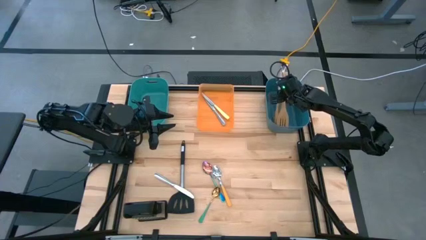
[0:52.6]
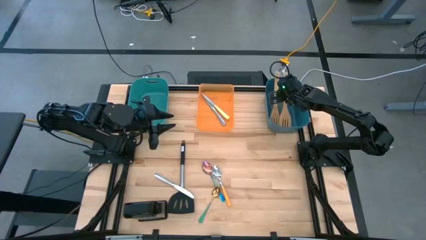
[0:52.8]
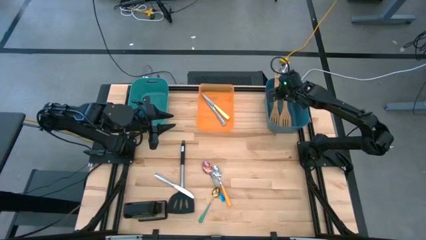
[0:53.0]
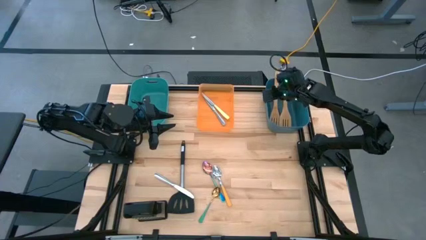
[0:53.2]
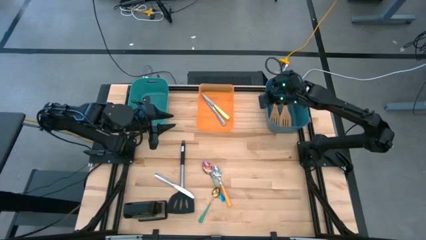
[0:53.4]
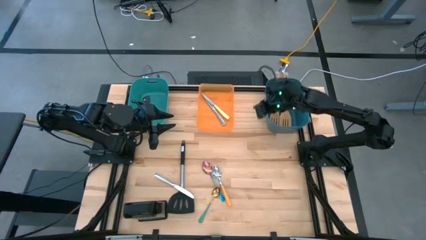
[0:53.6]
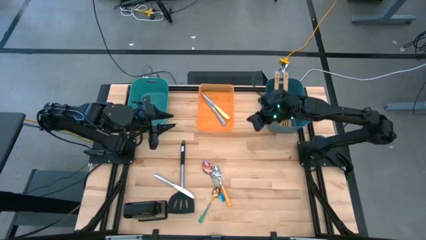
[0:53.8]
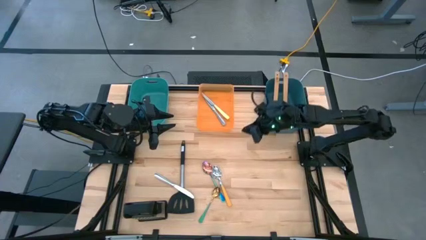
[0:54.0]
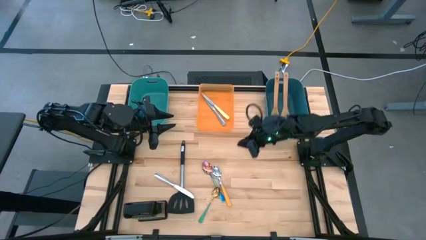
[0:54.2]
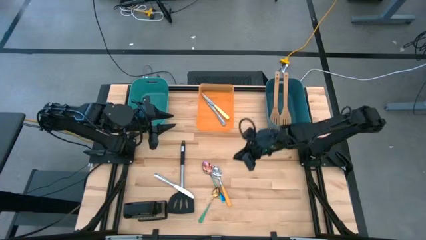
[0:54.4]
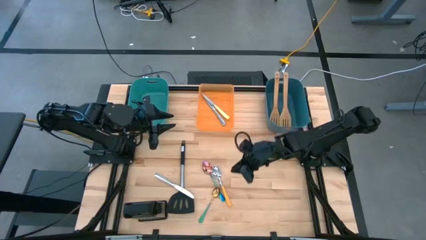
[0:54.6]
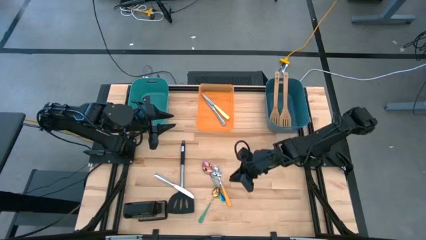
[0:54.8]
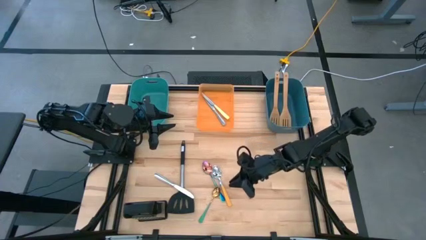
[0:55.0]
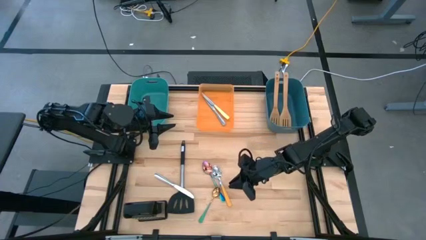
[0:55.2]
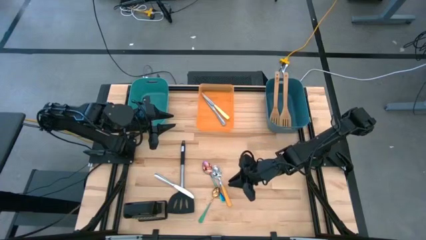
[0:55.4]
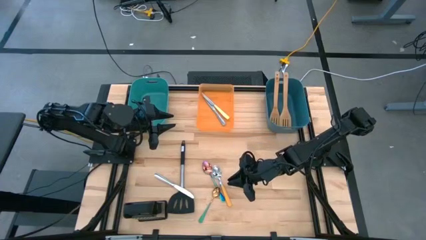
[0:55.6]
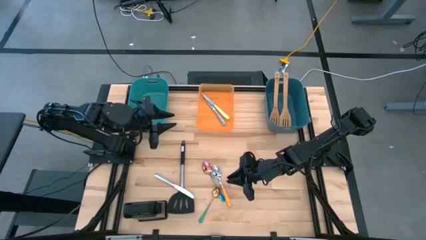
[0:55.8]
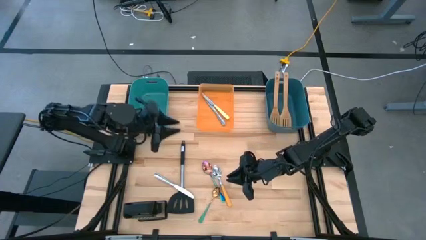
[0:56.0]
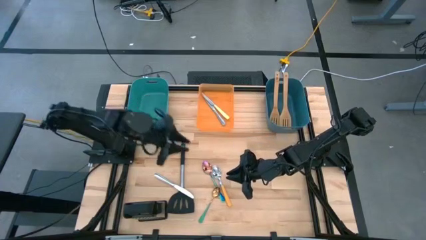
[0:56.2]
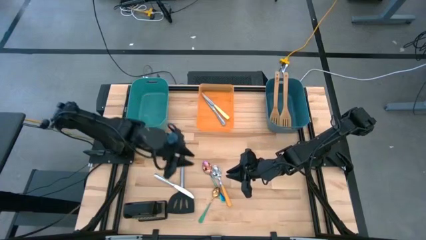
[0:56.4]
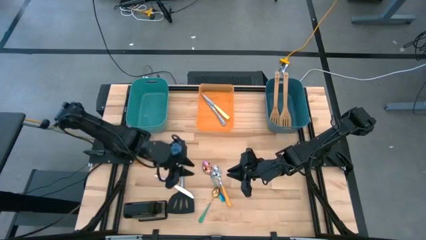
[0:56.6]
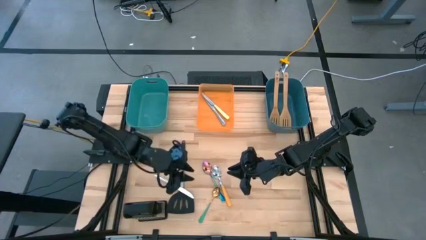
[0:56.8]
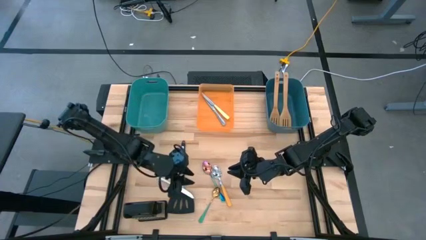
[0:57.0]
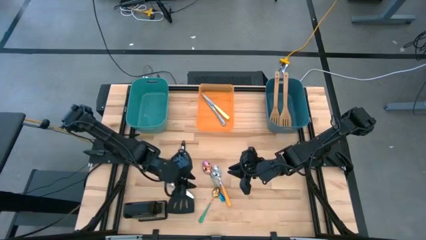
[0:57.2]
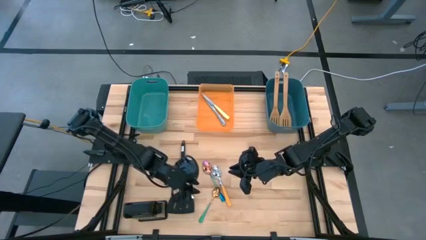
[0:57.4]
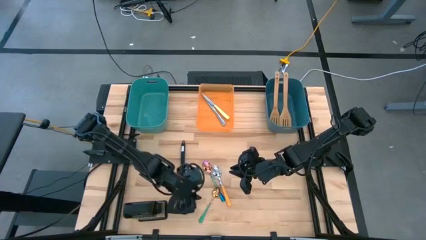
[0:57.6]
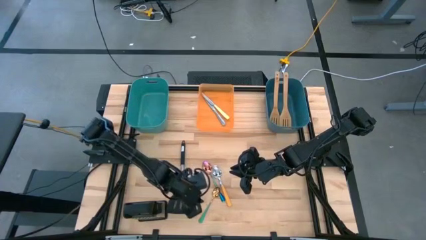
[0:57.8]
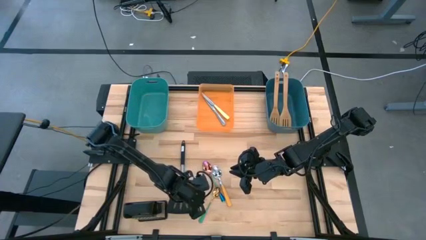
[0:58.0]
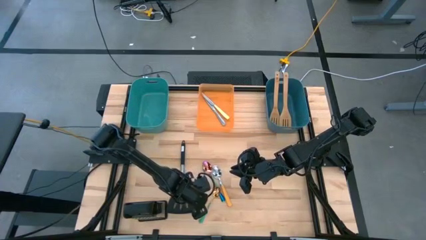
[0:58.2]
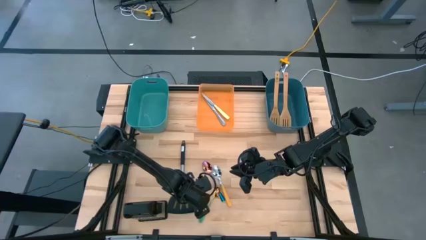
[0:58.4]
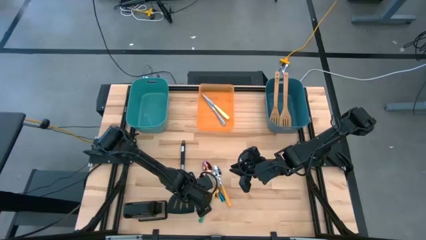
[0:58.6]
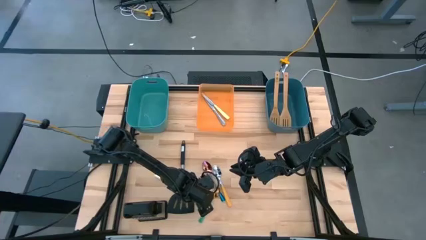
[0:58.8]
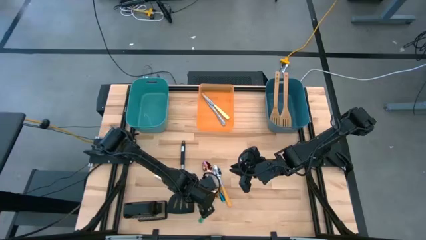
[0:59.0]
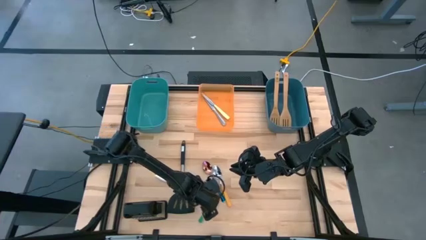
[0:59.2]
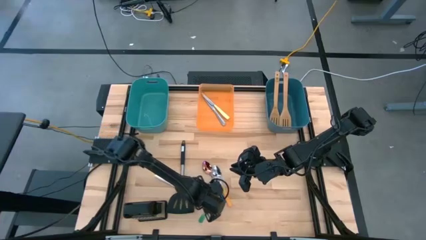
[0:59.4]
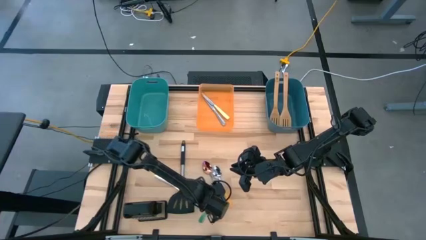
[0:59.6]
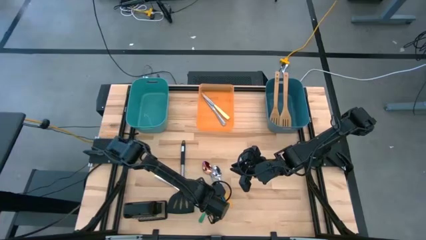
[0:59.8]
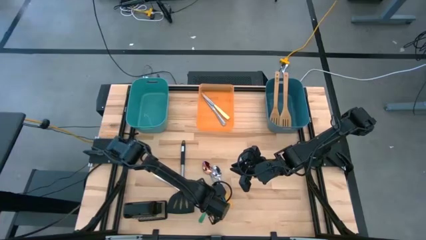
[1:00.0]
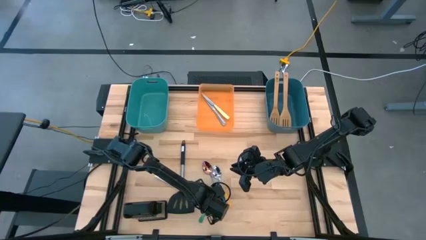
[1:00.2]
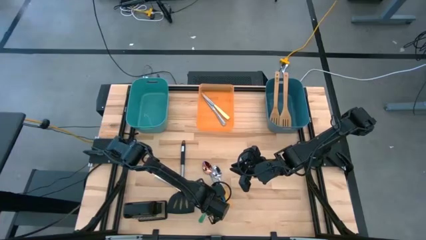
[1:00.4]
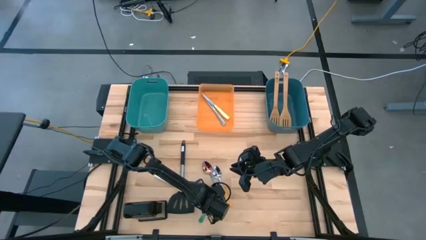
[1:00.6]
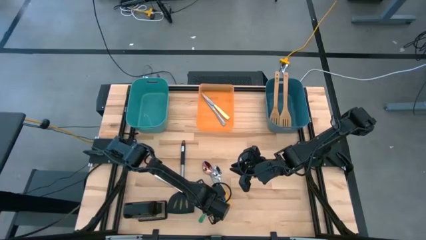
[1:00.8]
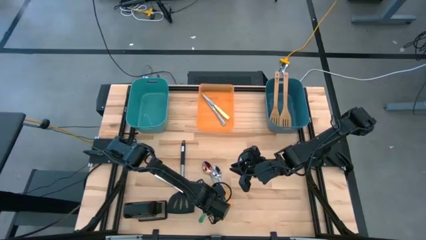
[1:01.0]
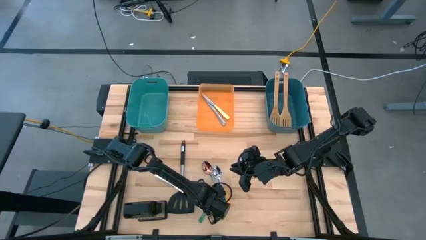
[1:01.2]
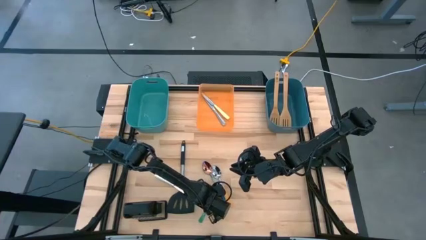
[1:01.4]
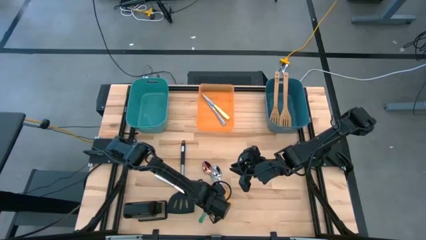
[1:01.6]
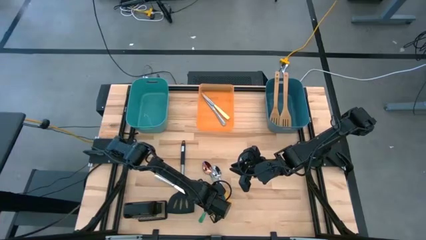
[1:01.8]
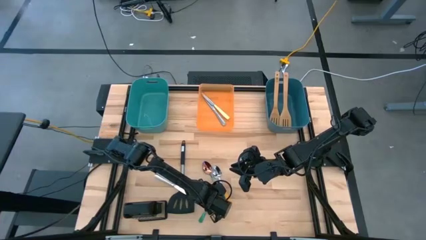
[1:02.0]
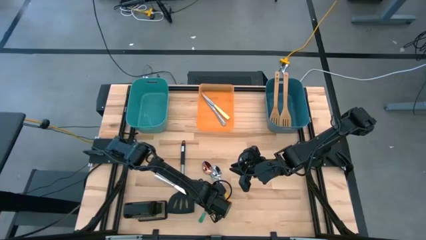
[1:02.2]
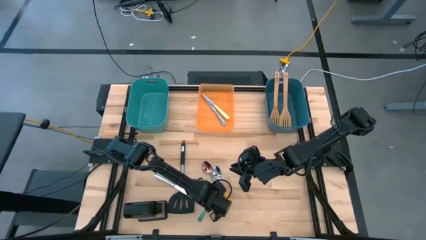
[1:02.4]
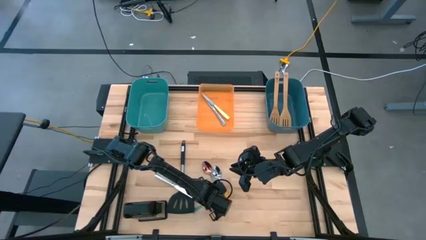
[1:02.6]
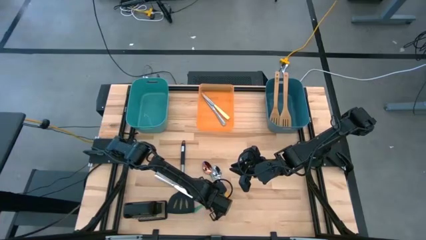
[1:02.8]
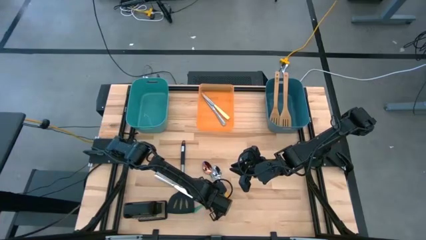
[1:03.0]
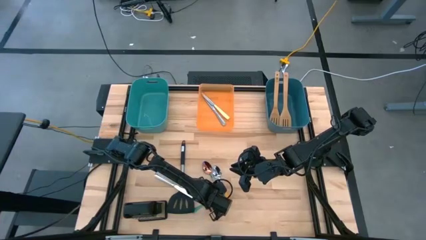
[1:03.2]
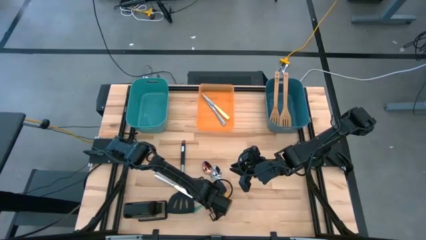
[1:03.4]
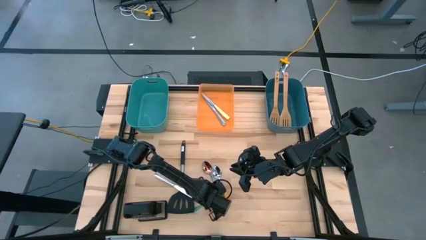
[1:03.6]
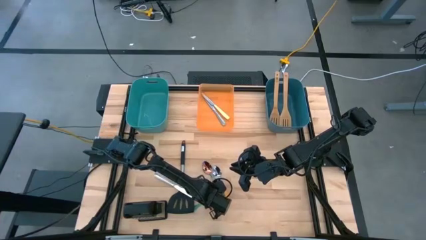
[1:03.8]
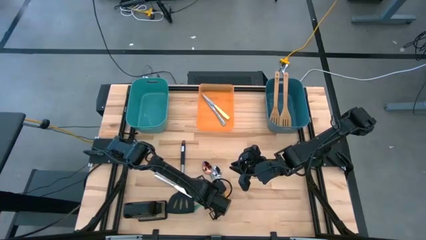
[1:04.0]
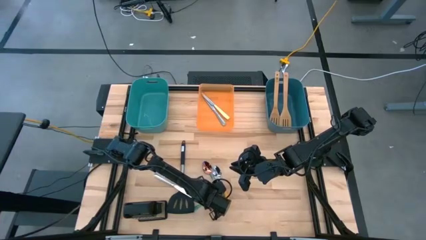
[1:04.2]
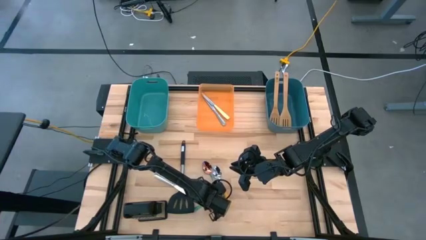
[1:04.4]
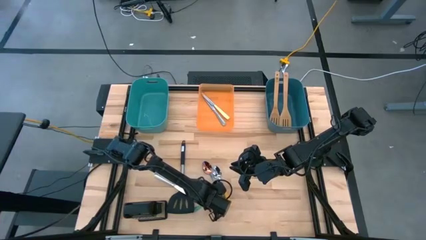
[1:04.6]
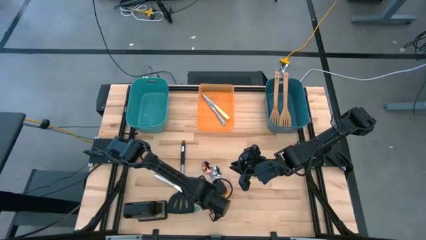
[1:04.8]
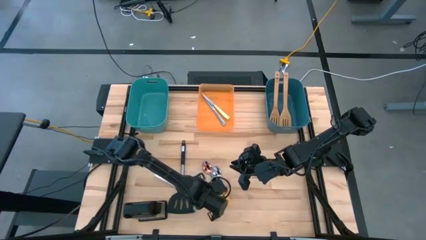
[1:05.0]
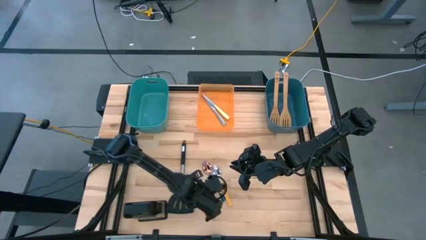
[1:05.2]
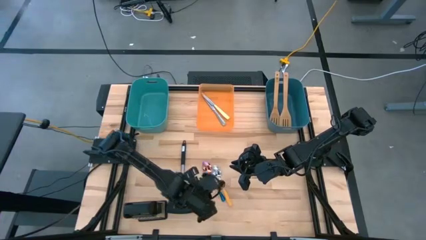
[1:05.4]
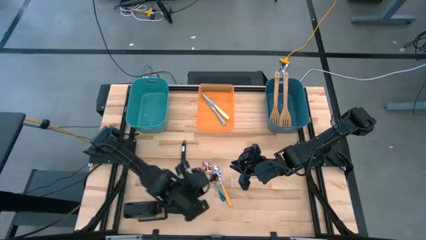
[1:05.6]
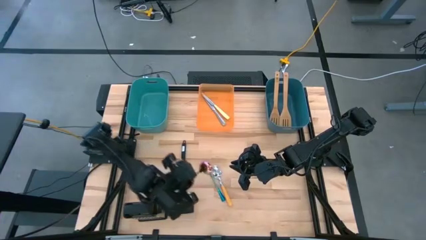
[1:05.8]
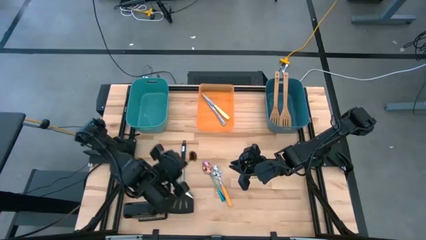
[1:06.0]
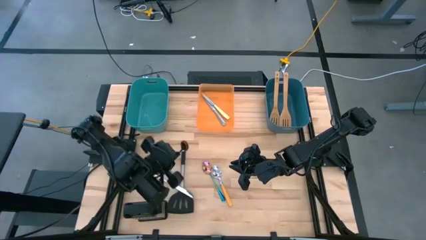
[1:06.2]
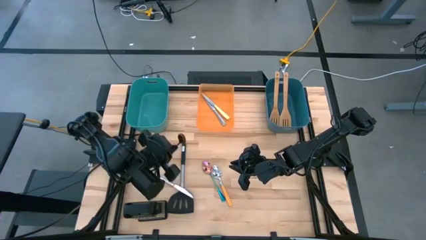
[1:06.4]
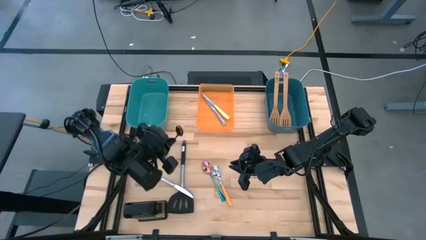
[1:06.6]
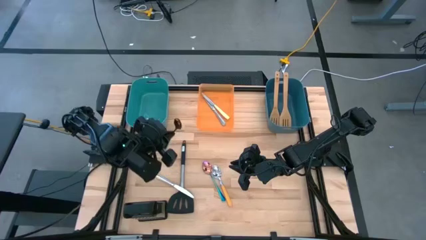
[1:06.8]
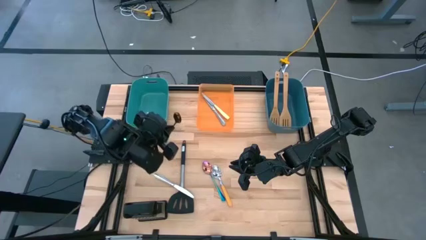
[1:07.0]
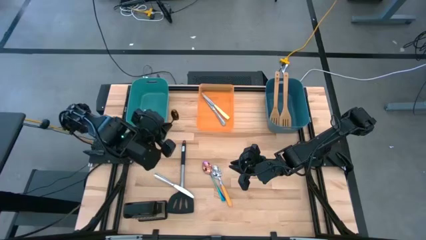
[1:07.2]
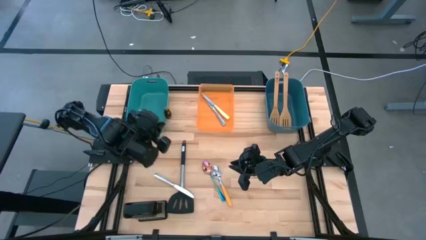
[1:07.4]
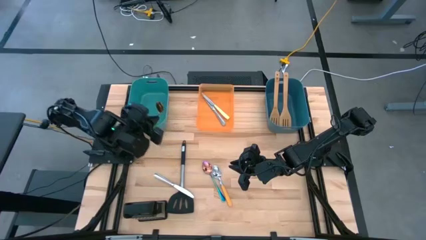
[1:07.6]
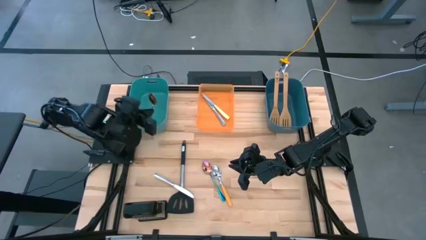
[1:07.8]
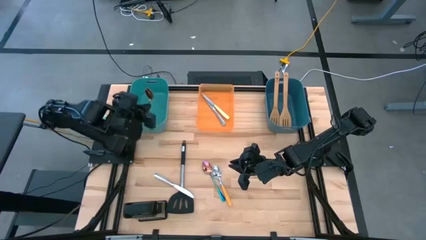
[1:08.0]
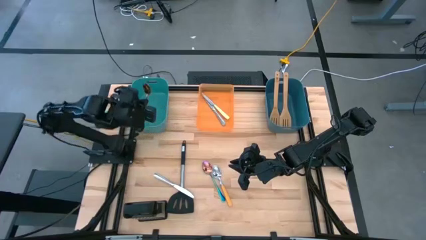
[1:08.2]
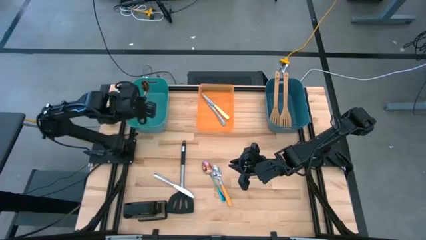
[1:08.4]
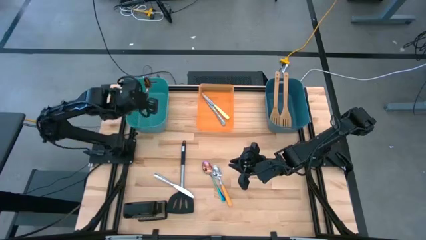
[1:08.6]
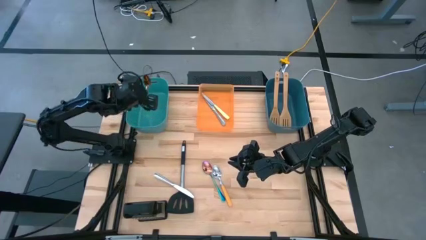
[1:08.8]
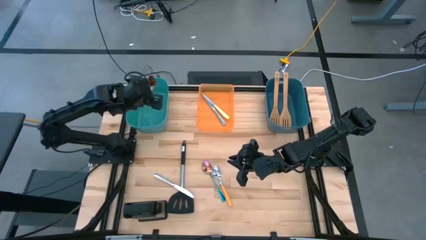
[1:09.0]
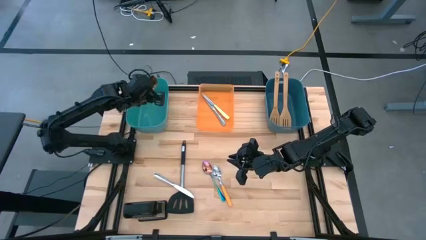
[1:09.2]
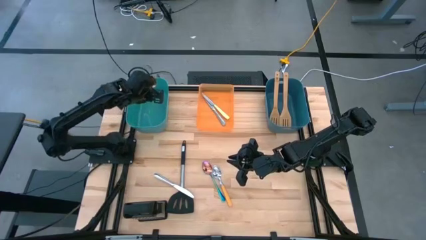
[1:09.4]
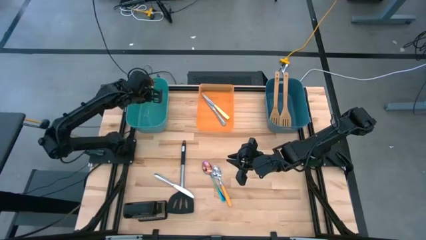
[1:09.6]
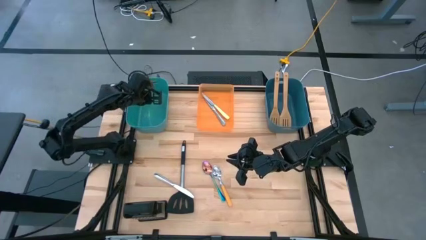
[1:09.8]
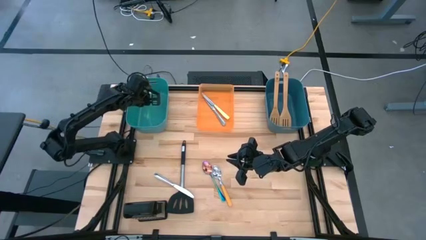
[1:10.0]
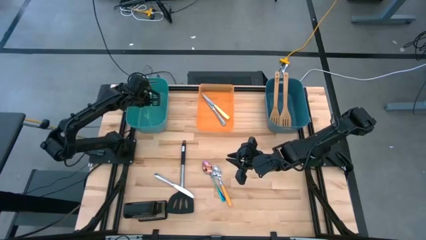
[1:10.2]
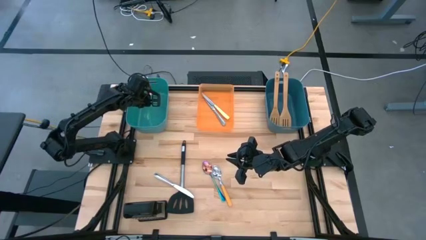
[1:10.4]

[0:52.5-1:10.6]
Task: Pick & Place Kitchen Items
Put the gold spoon into the green bin
